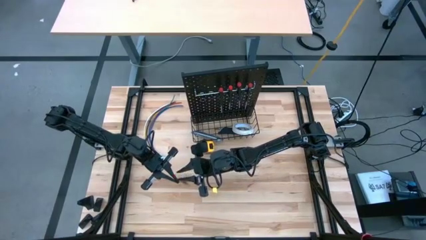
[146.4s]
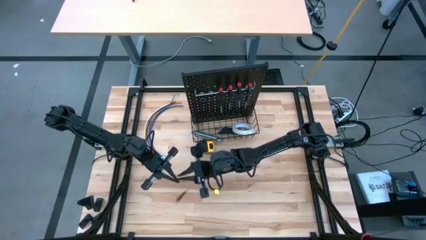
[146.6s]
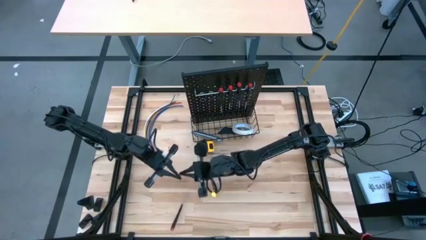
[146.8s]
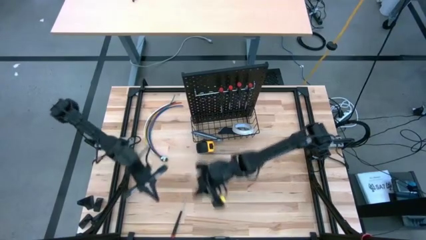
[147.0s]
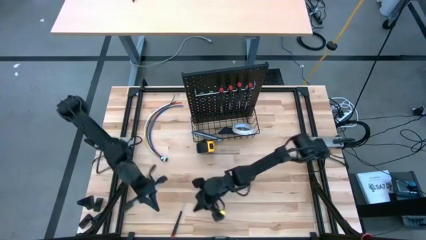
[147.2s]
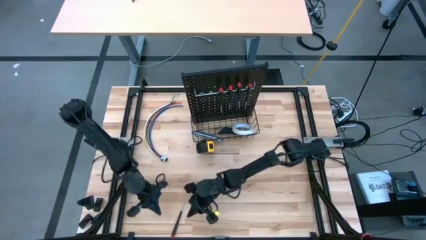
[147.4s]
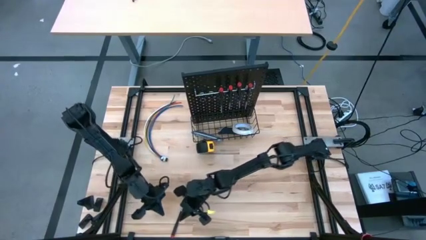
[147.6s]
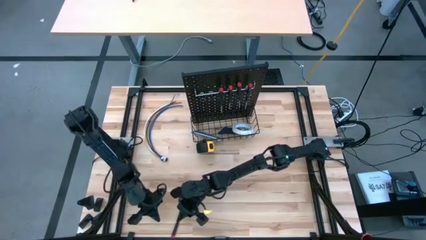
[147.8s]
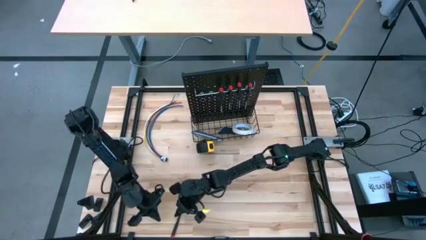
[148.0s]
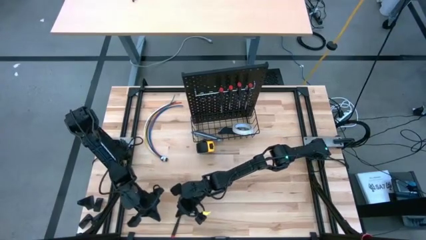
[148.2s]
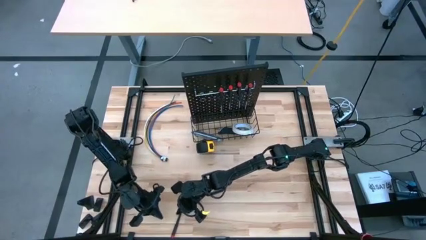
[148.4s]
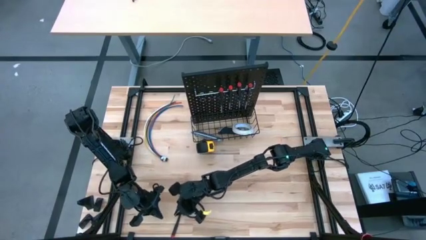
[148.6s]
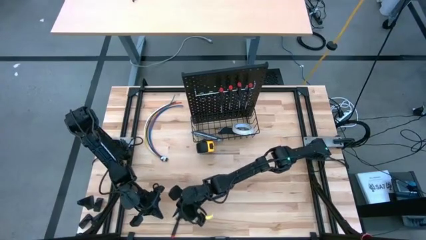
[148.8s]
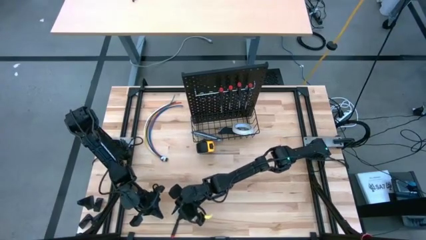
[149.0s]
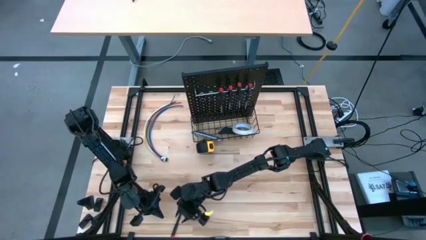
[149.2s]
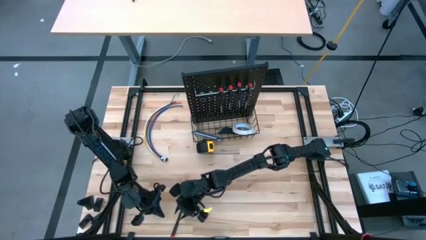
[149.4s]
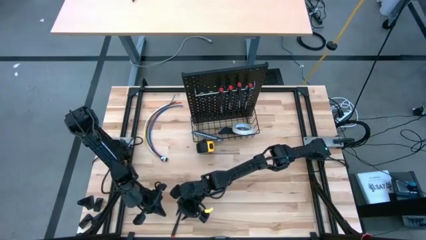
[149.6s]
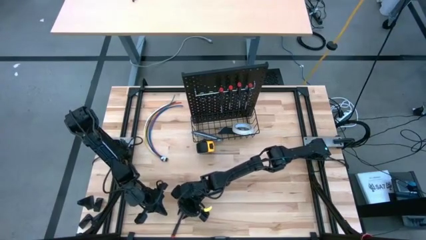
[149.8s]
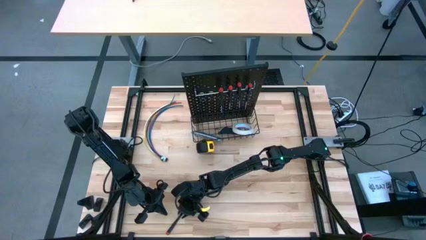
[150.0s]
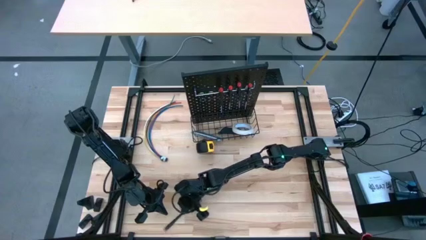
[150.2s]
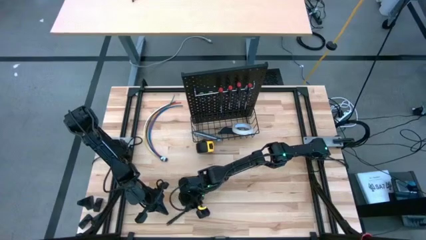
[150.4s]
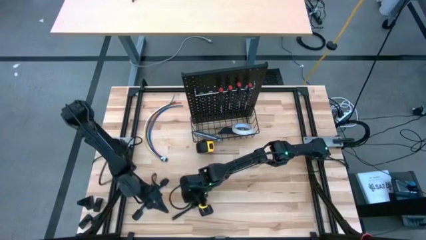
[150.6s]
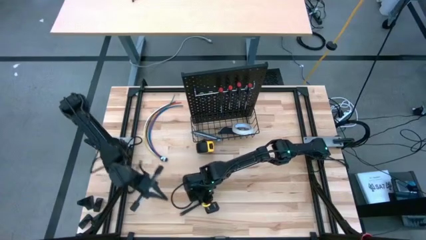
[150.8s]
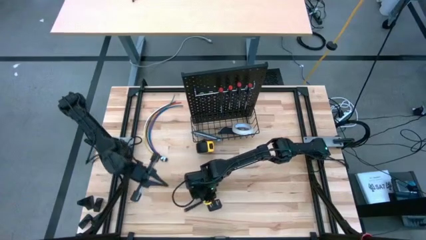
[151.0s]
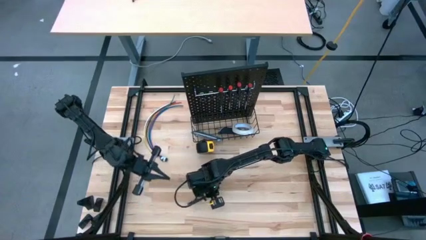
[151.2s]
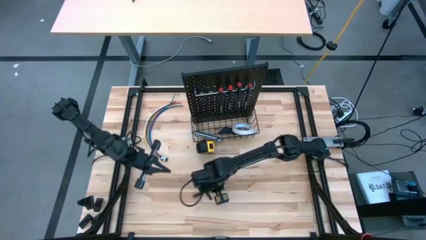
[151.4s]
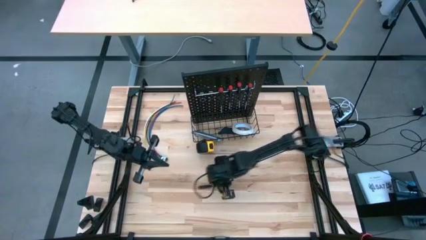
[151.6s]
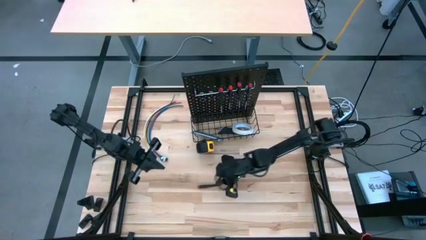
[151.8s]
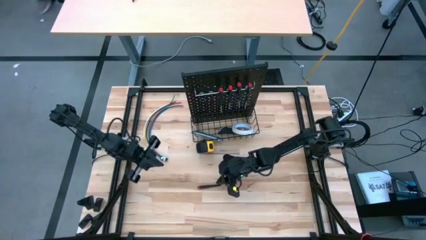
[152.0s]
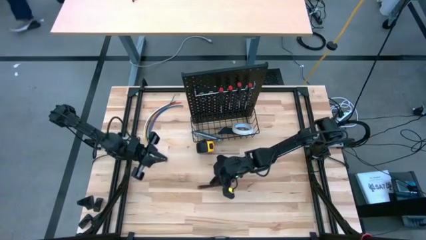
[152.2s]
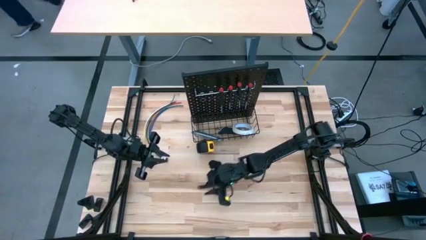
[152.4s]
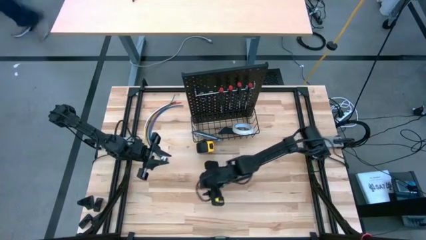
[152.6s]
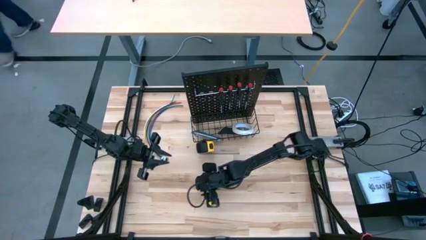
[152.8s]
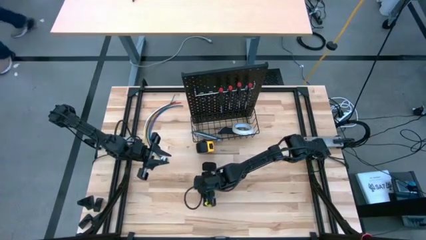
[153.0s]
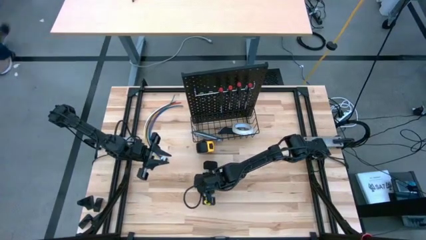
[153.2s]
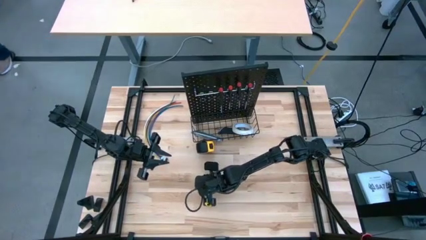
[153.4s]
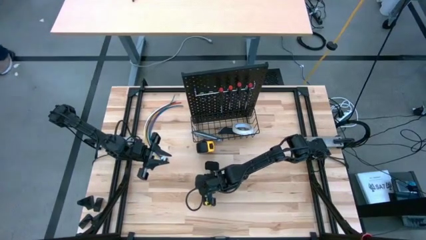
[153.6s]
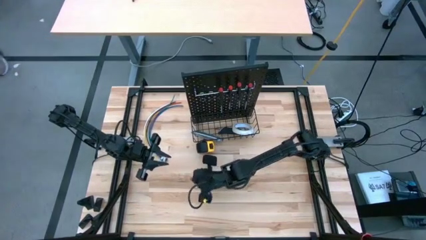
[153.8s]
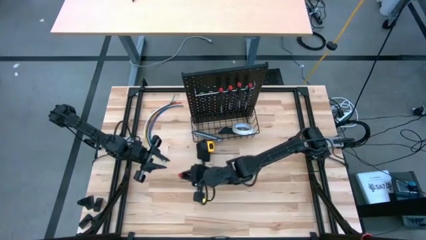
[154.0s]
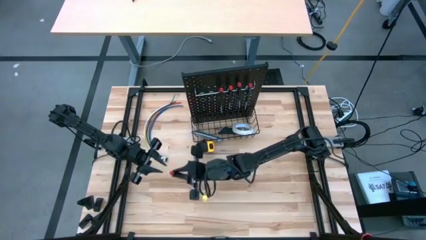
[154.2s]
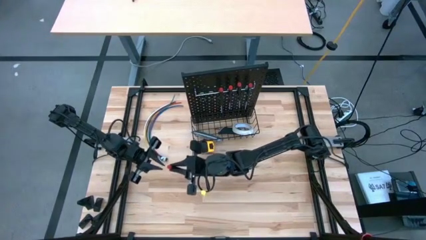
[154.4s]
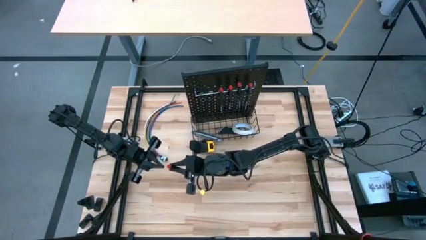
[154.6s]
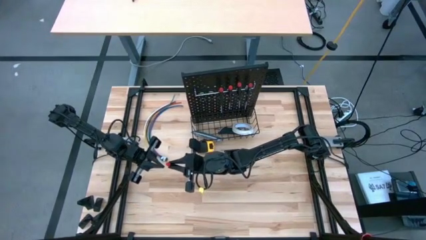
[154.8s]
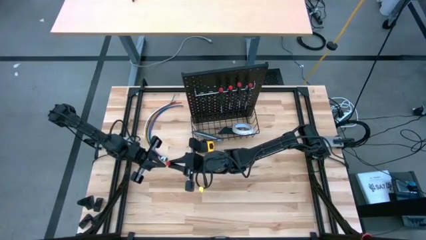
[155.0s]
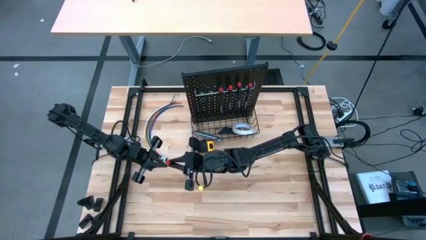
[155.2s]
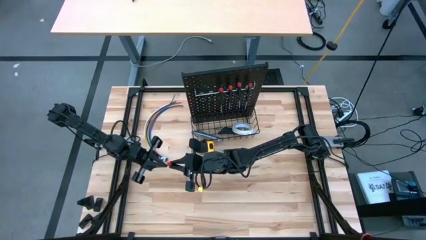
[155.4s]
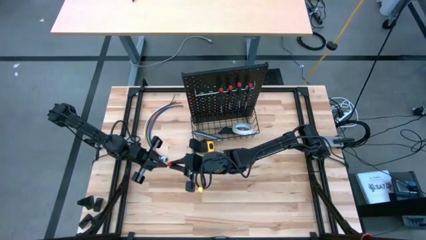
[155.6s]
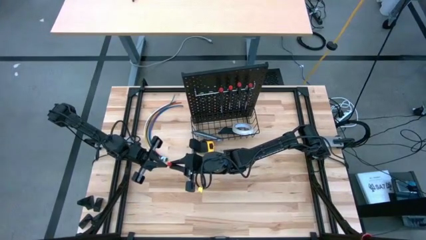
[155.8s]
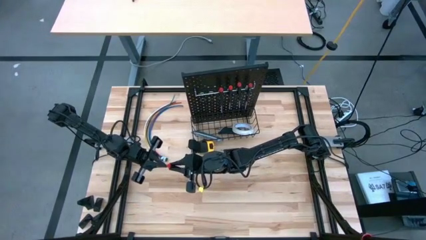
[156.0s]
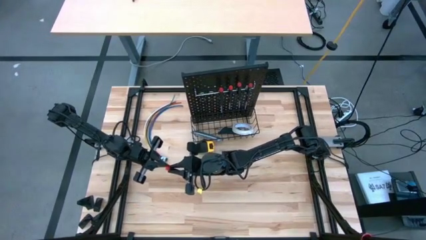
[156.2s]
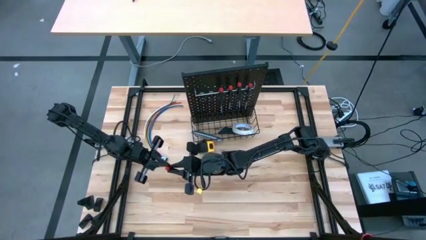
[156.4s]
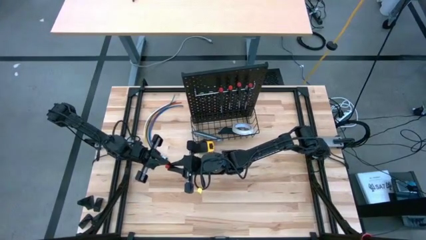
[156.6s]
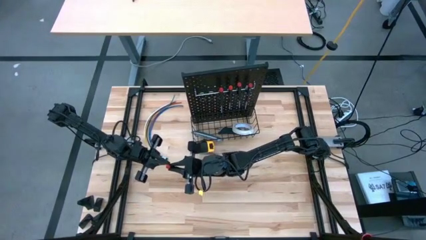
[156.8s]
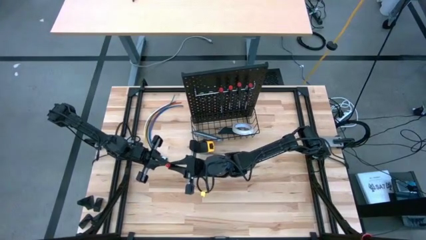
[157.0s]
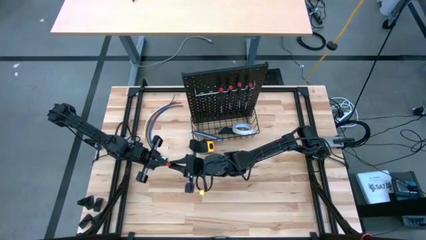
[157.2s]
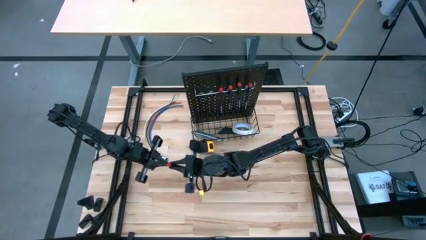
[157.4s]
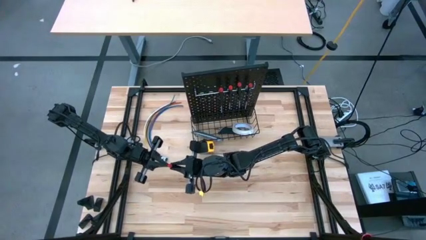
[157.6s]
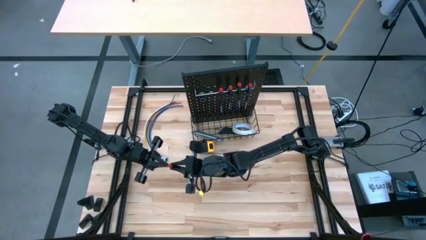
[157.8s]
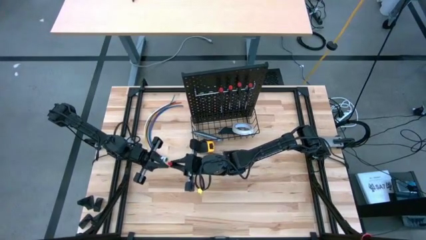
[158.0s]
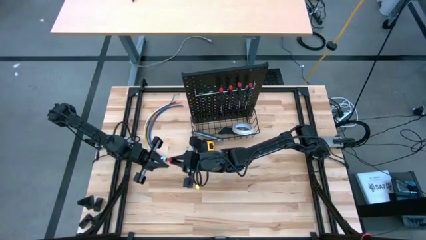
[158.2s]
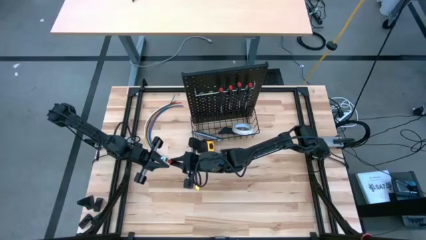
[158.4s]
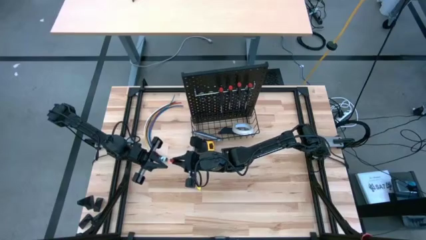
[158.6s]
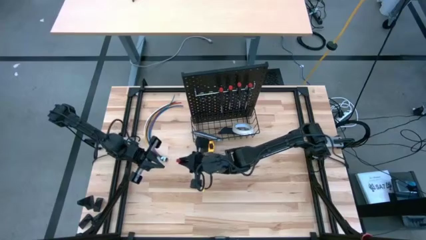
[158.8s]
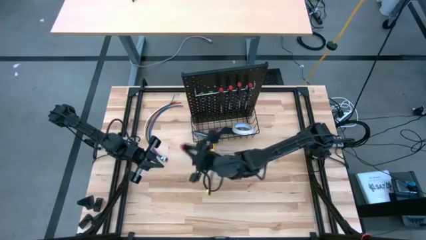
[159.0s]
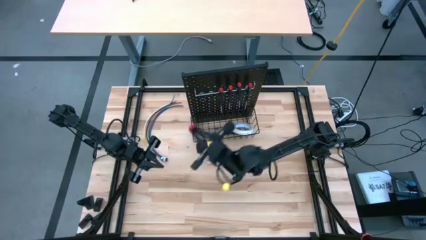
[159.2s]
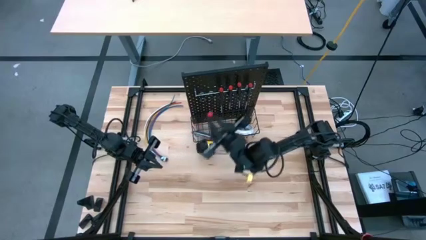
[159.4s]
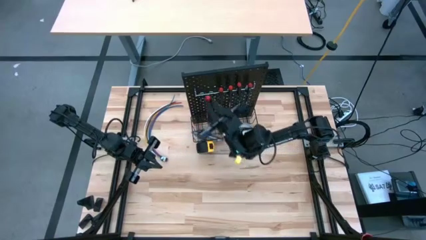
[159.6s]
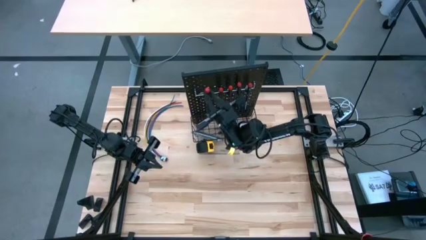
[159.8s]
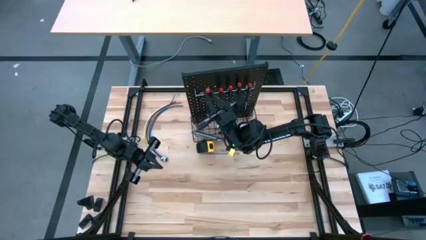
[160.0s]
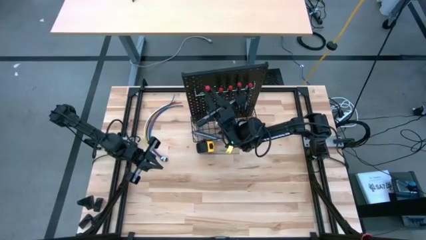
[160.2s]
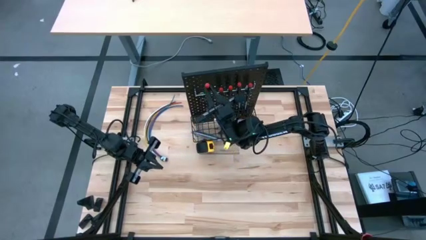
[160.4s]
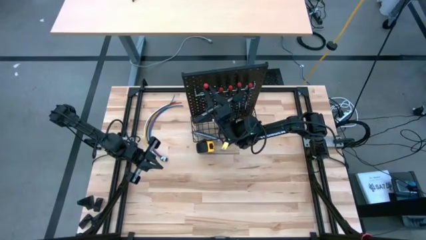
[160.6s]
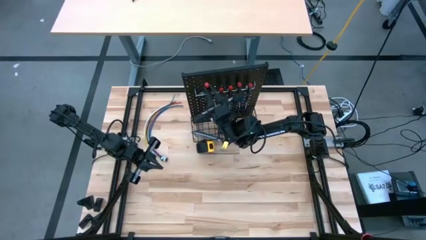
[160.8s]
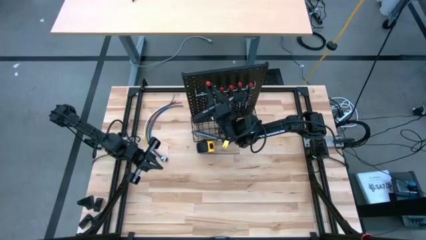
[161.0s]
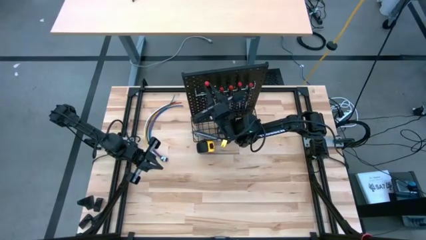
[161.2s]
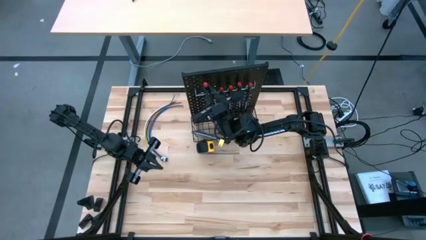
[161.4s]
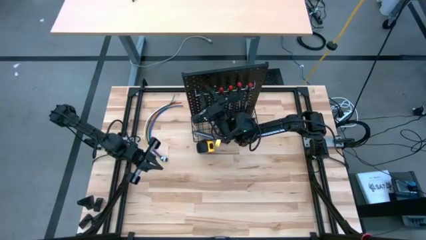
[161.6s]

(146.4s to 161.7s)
Task: Hang tools onto peg board
Hang the black screwdriver onto the pegboard

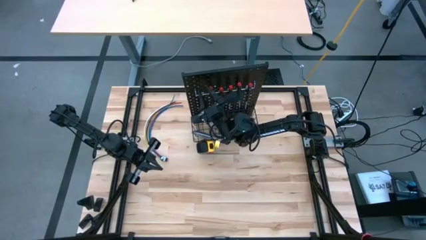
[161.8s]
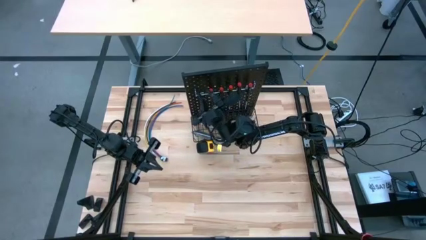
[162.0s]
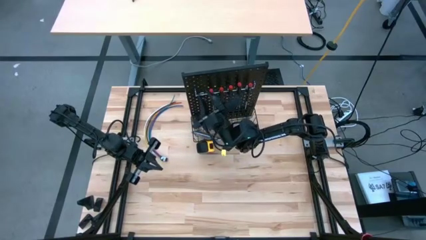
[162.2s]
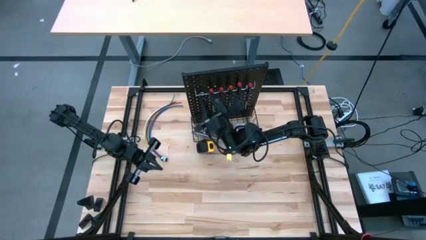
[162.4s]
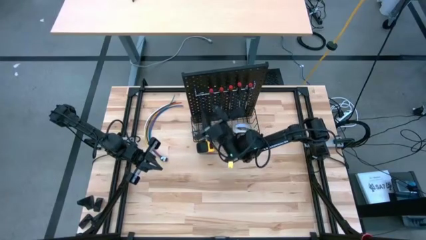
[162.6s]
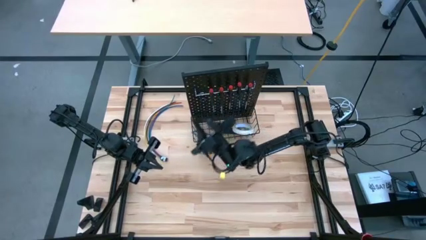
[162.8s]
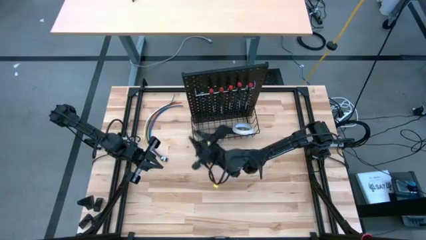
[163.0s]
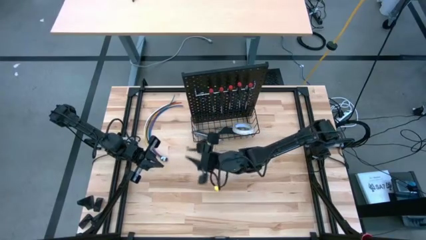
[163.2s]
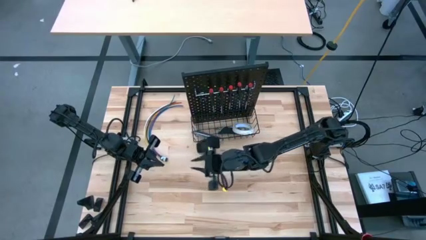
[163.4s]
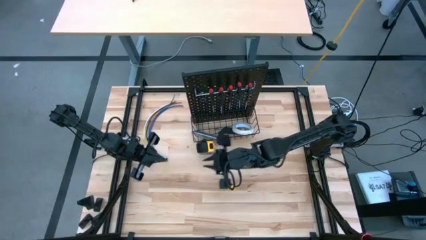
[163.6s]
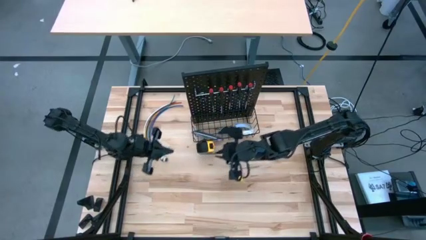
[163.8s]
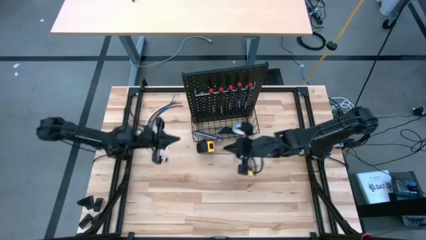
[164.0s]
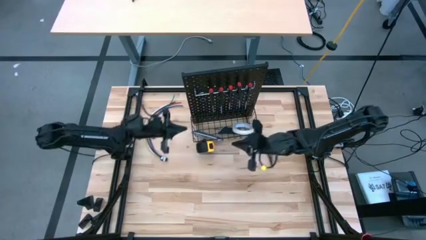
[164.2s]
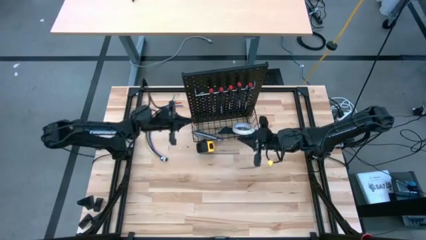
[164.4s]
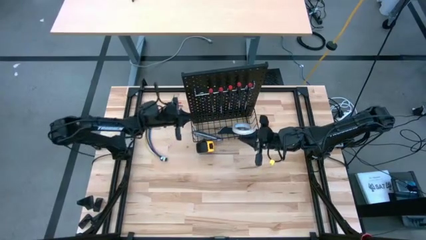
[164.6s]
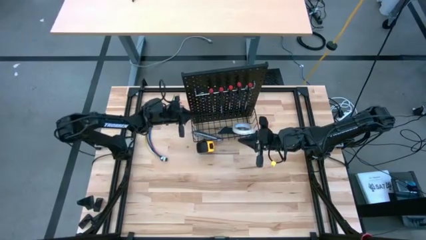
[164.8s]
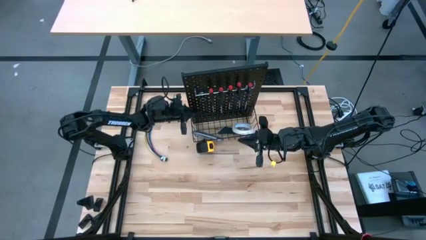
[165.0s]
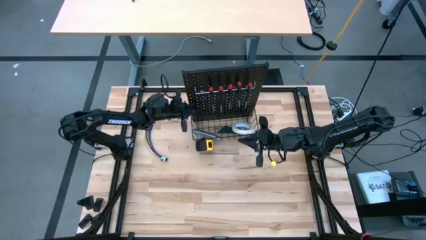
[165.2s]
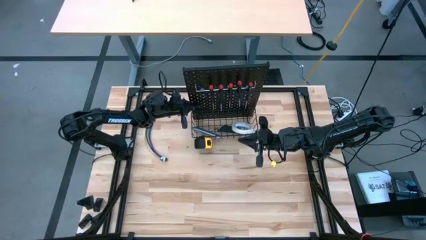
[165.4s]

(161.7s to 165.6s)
Adjust the pegboard
